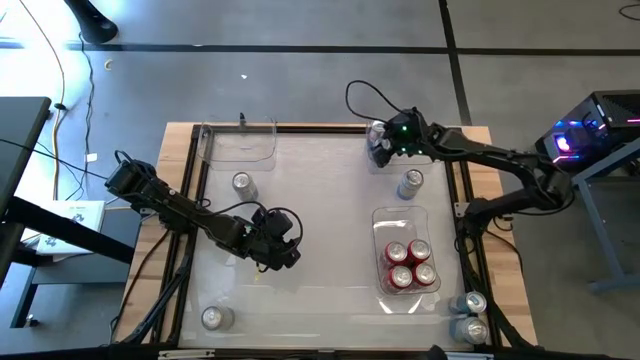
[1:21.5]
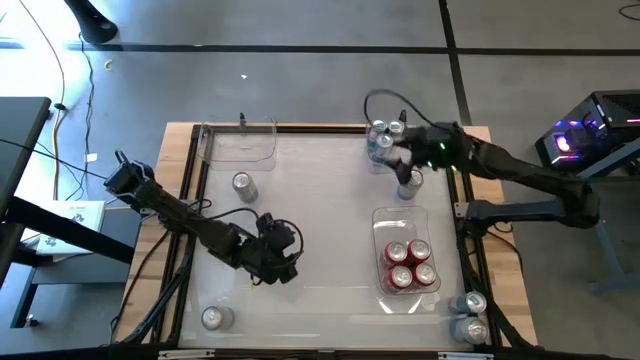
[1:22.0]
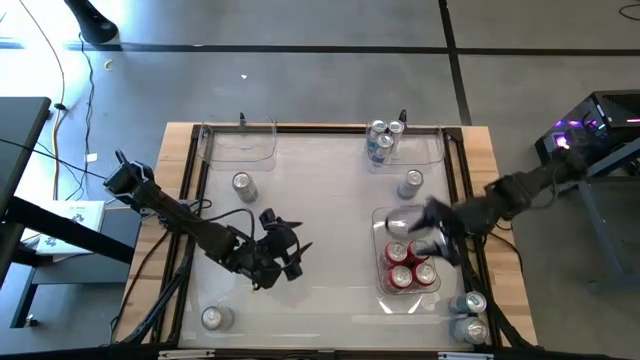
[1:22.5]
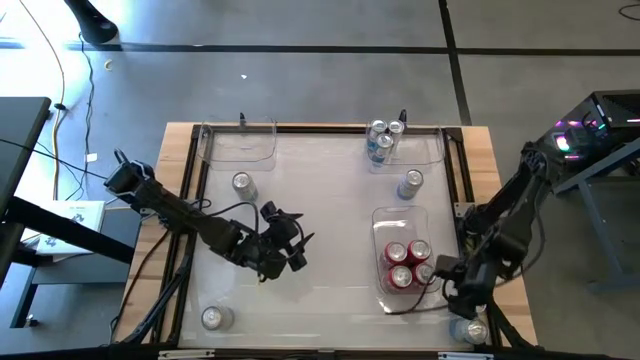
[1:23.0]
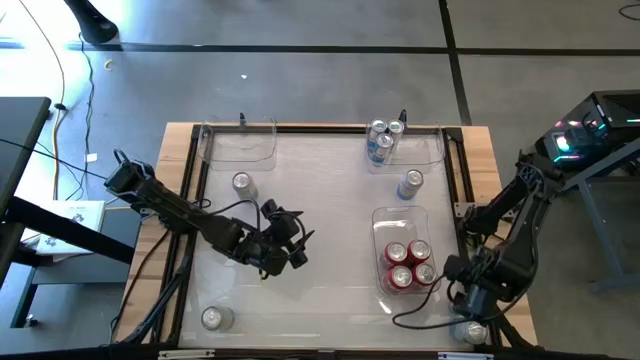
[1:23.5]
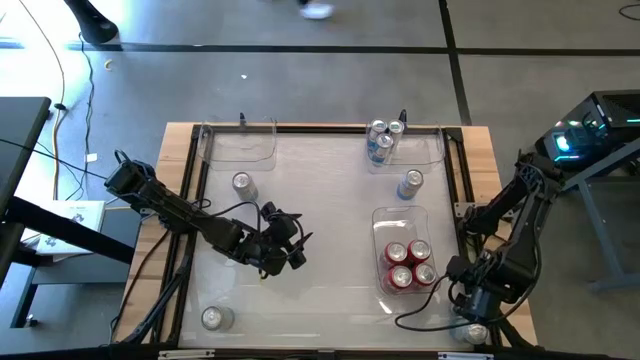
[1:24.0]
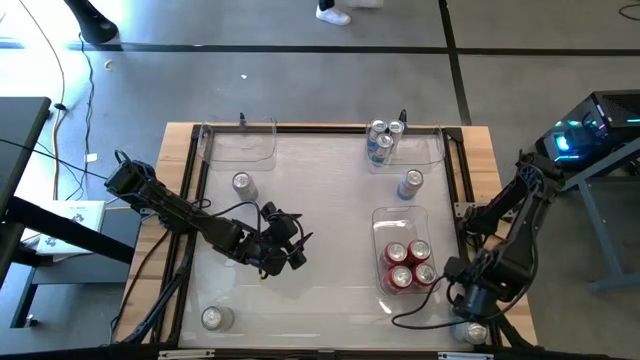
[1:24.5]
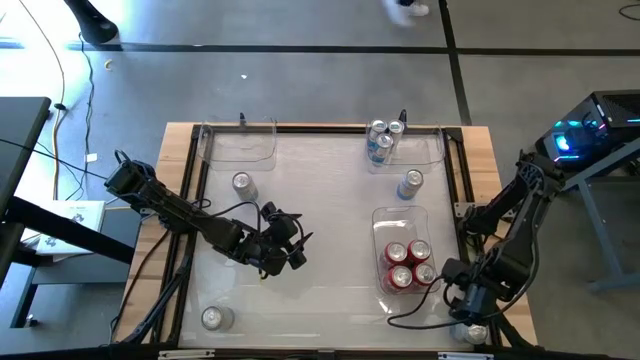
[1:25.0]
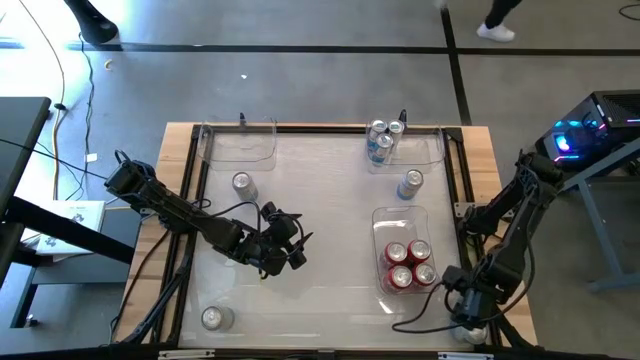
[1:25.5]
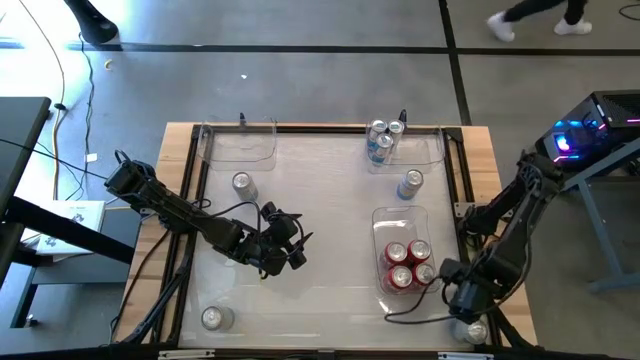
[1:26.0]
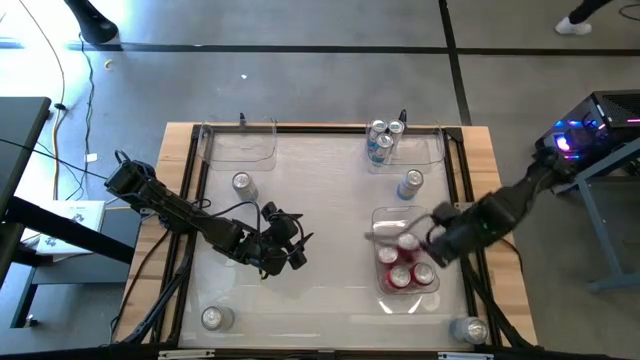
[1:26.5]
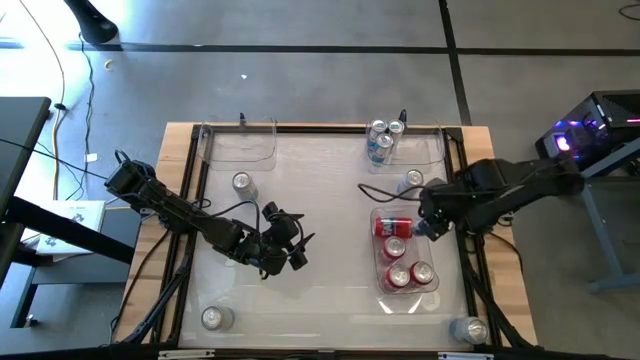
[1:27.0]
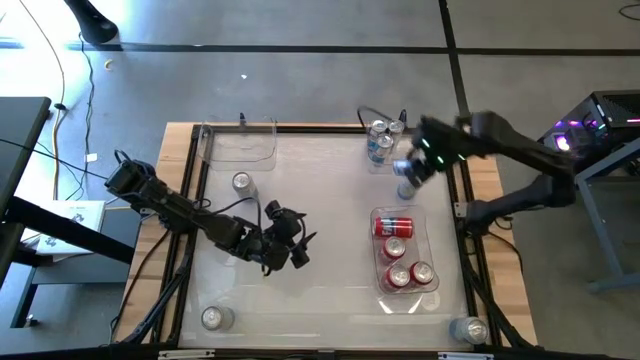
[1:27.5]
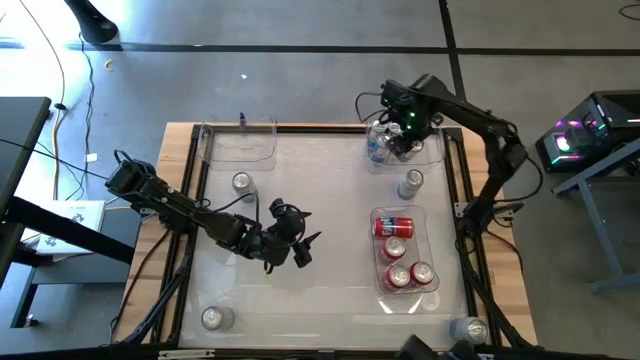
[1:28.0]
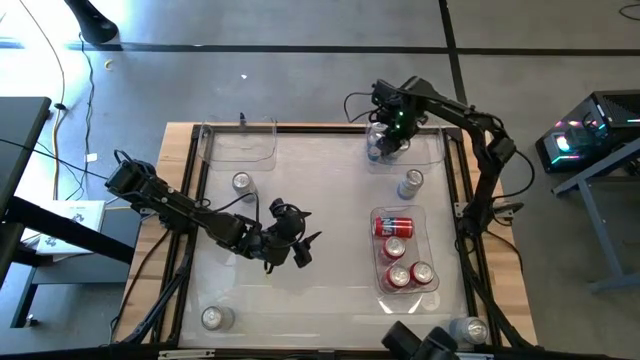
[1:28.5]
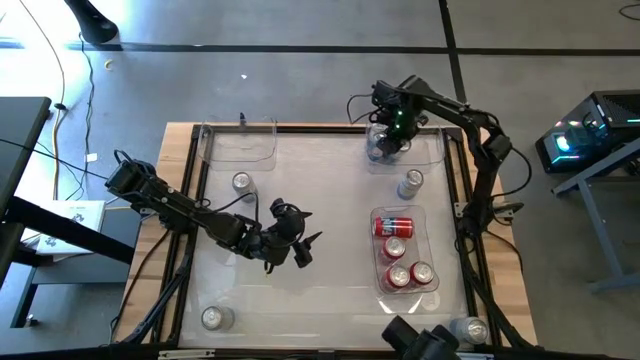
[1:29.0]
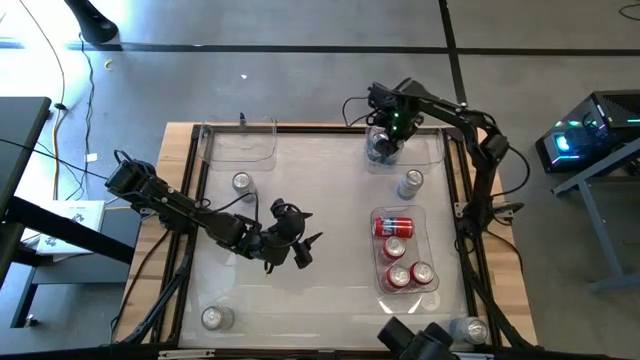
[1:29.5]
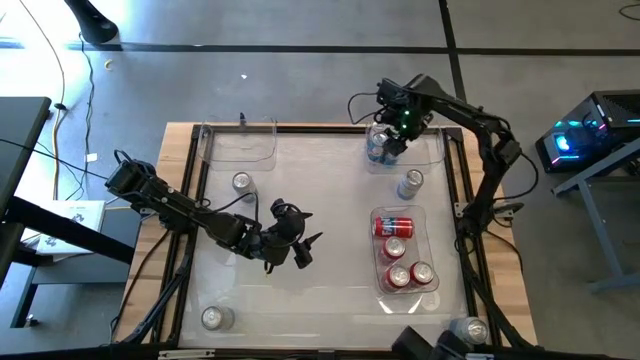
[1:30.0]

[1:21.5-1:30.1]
Task: Sort soda cans
Put the bottom blue soda can into the top right transparent bin

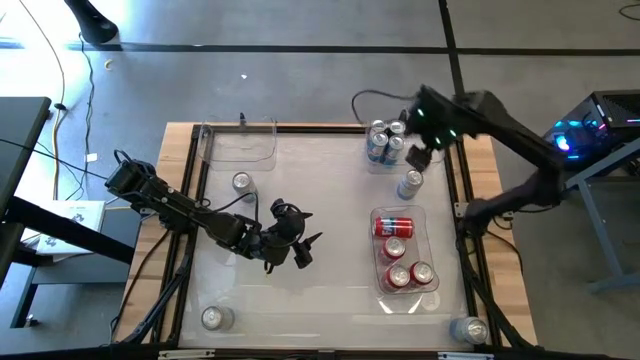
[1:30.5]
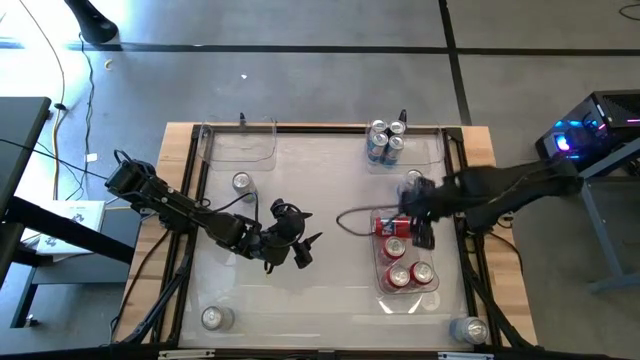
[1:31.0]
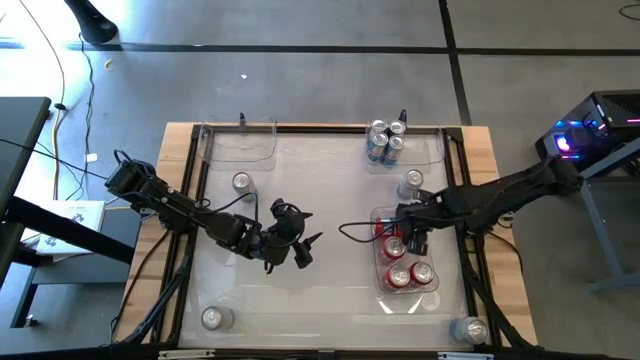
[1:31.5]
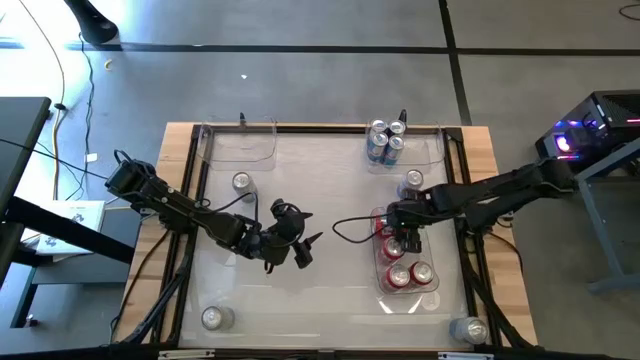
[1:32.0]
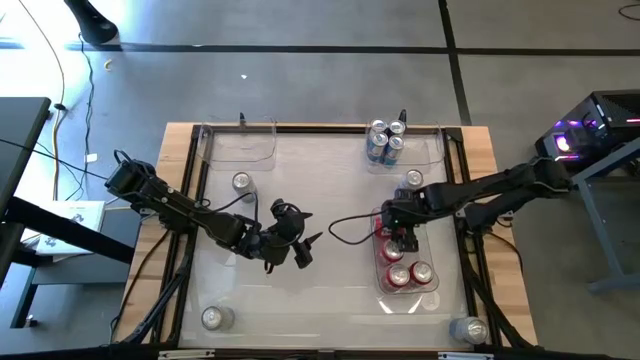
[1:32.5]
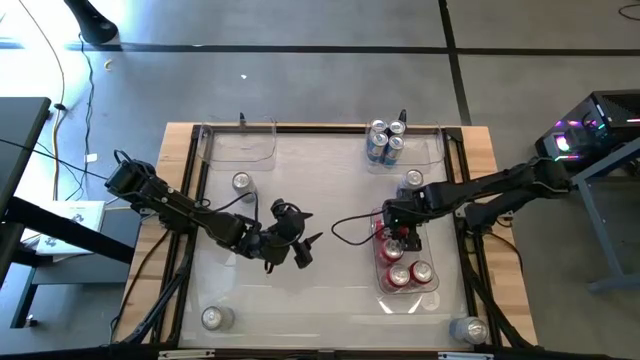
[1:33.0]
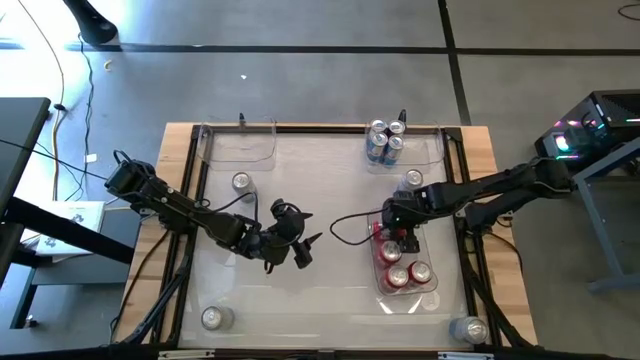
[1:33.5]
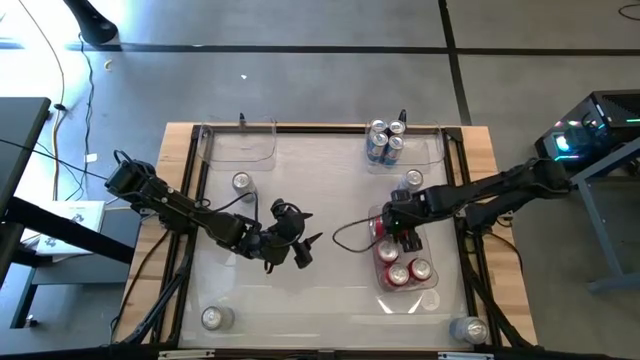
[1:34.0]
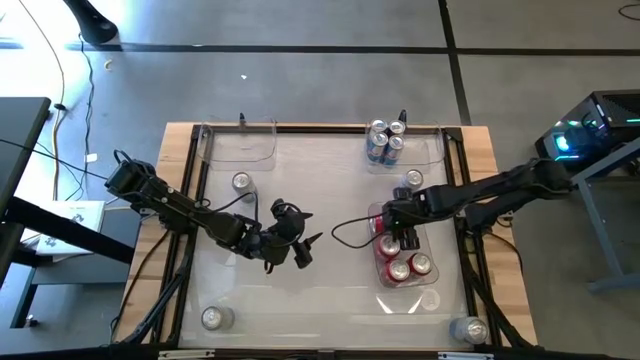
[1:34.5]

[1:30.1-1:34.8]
Remove the top orange soda can from the bottom right transparent bin

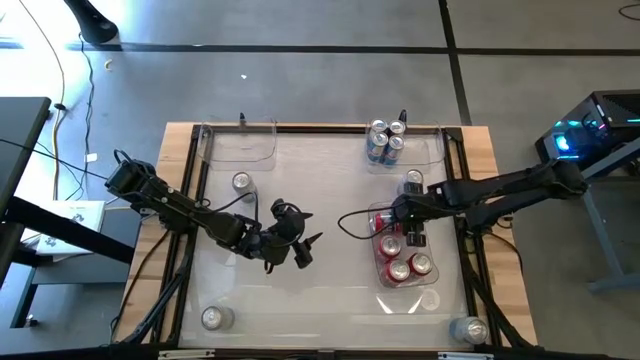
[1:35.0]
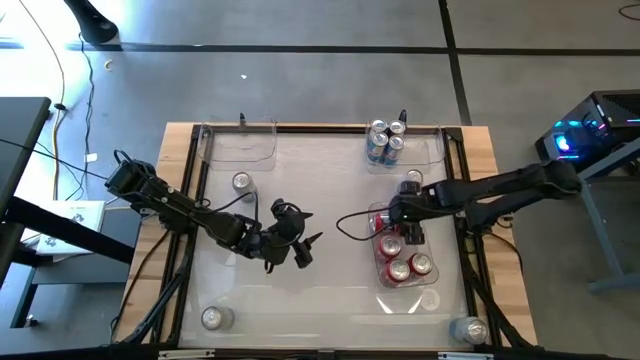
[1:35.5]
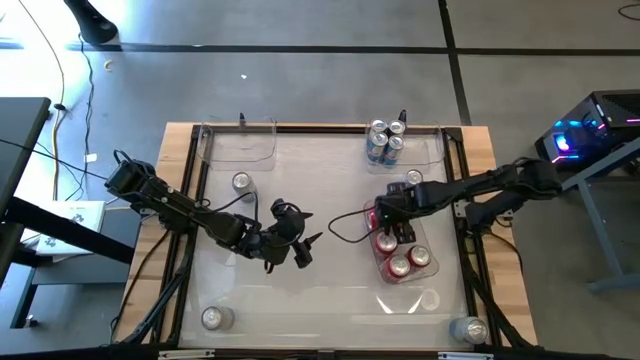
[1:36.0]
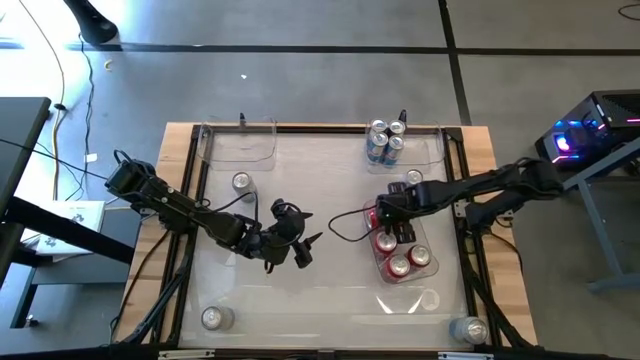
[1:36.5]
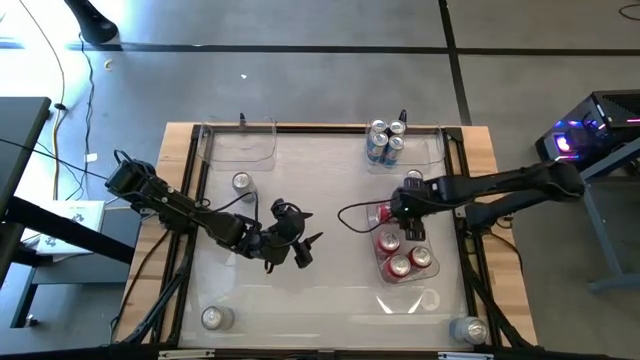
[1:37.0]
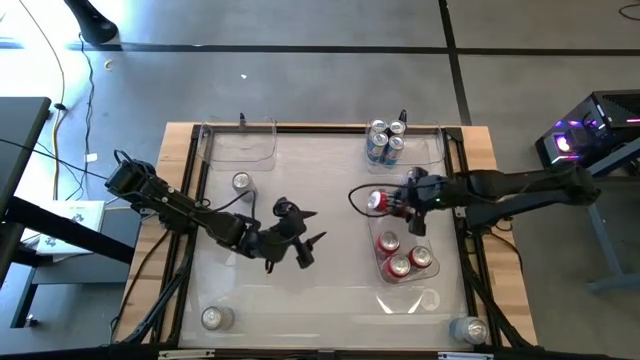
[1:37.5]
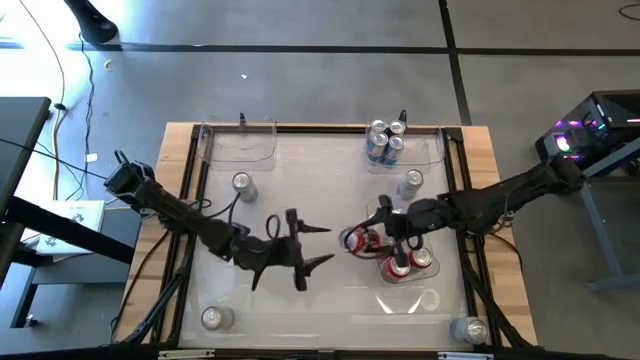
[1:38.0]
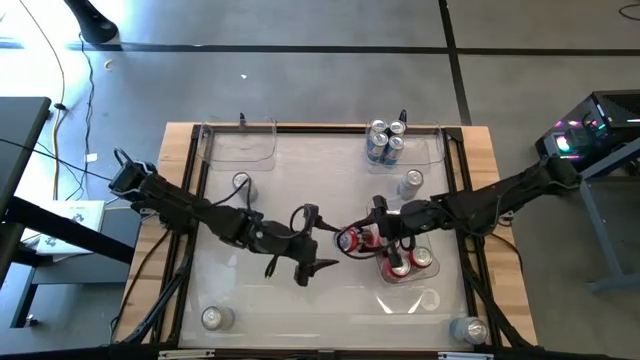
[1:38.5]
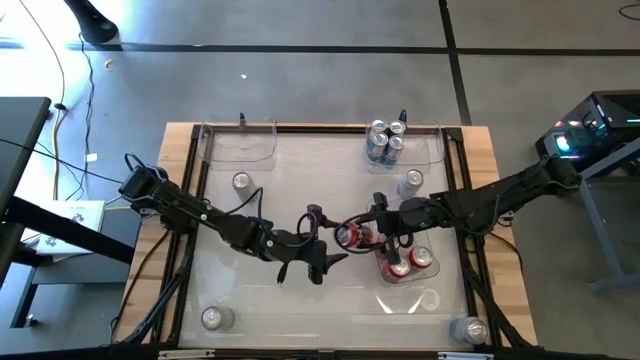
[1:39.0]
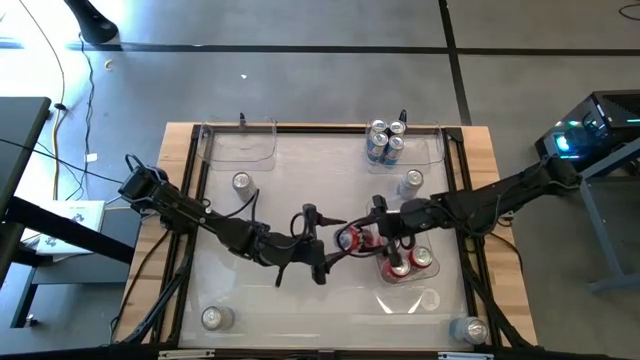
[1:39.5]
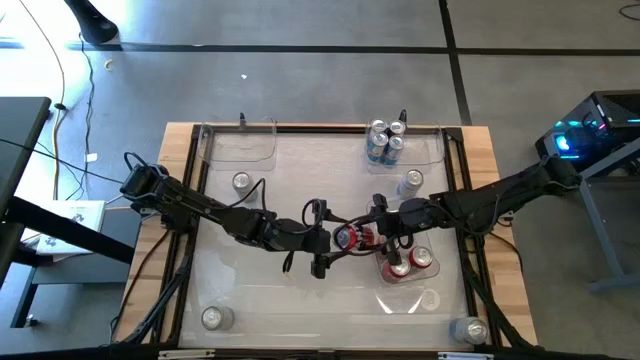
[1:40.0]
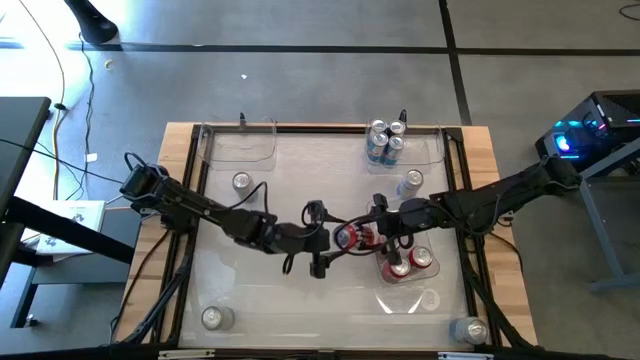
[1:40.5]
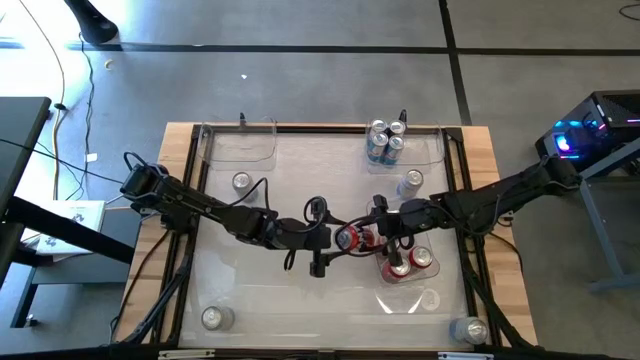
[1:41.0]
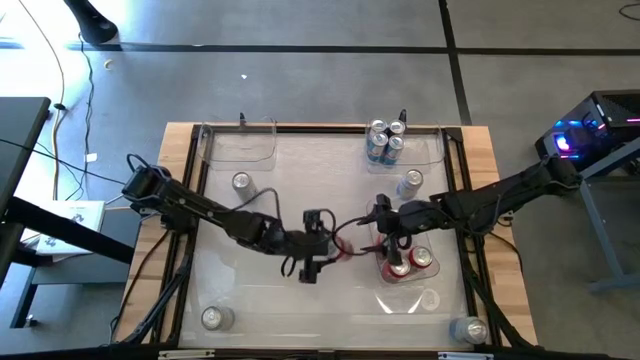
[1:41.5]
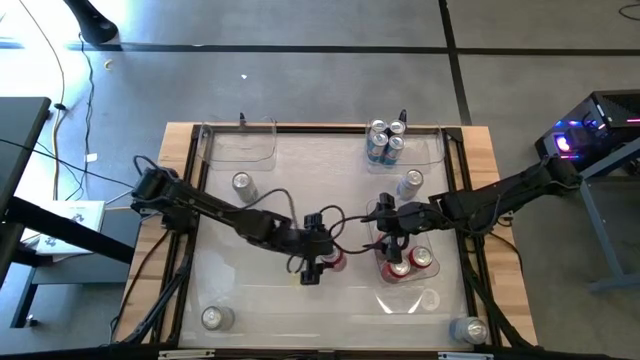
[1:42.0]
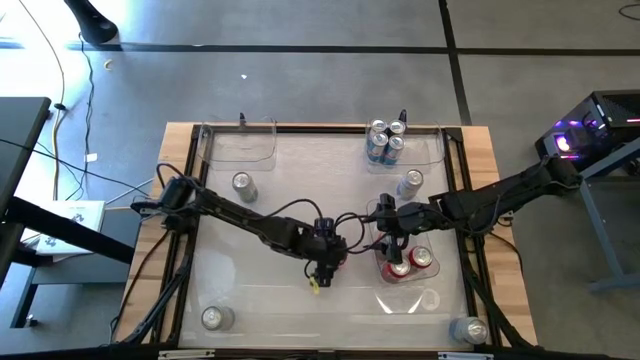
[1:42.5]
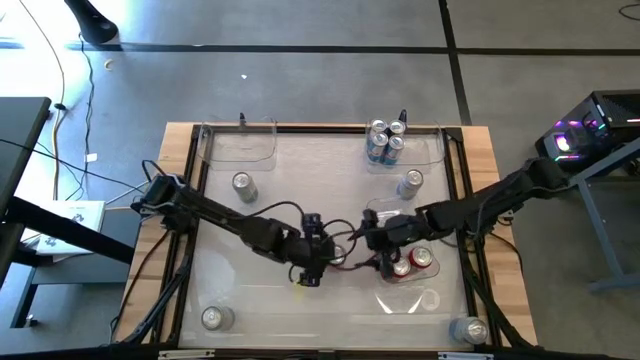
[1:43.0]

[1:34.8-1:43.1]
Remove the top orange soda can from the bottom right transparent bin
